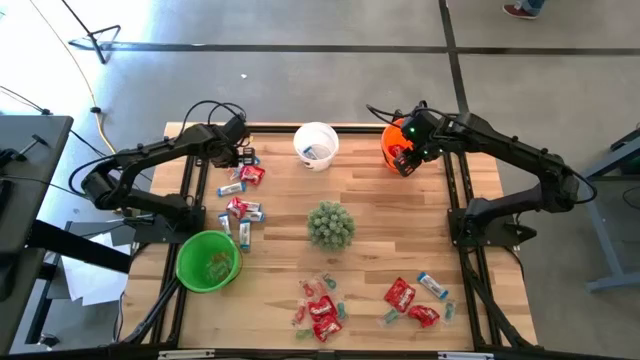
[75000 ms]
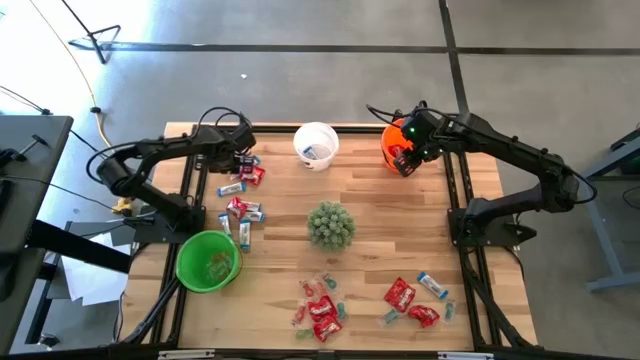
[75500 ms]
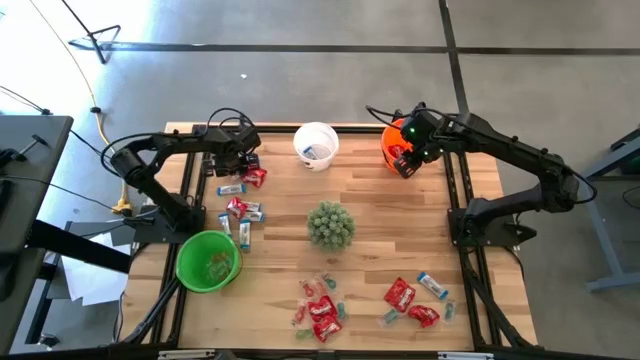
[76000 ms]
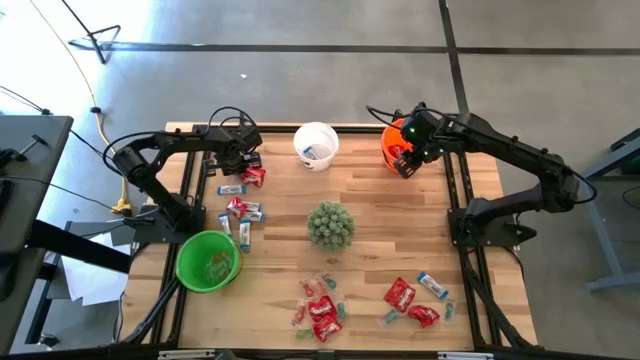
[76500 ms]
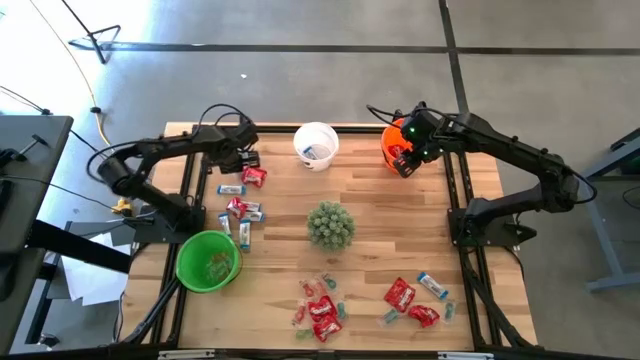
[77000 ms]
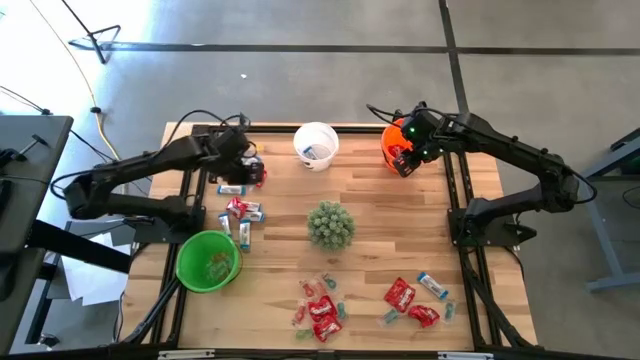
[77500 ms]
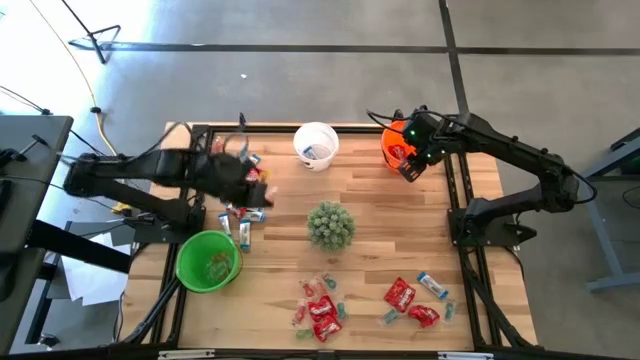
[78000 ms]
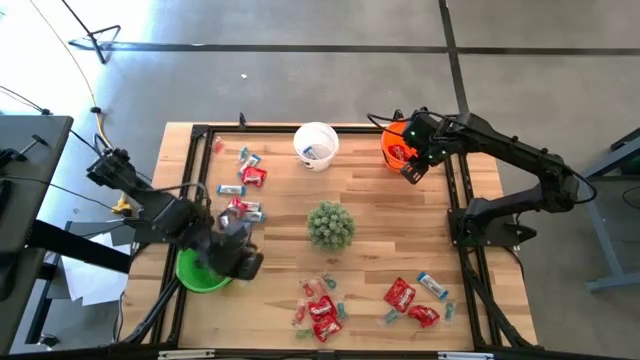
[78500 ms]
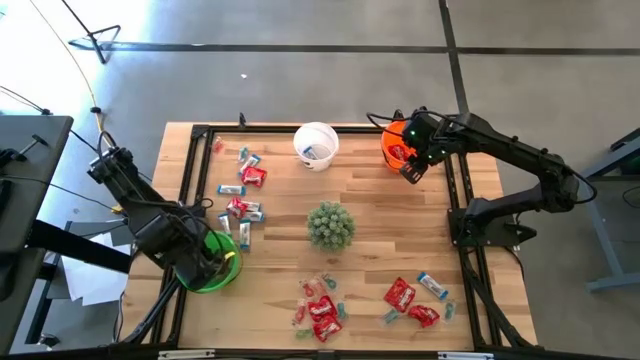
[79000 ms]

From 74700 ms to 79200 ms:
Task: Sort candy
Put the orange gummy into the green bucket

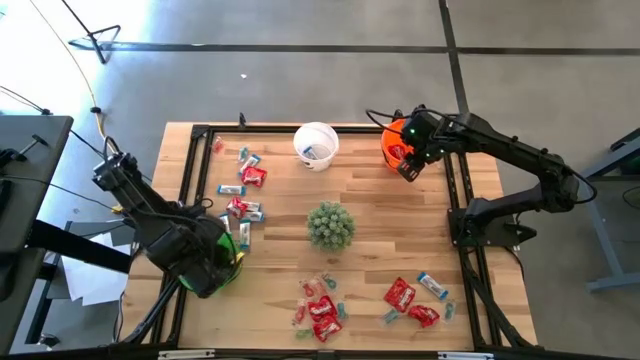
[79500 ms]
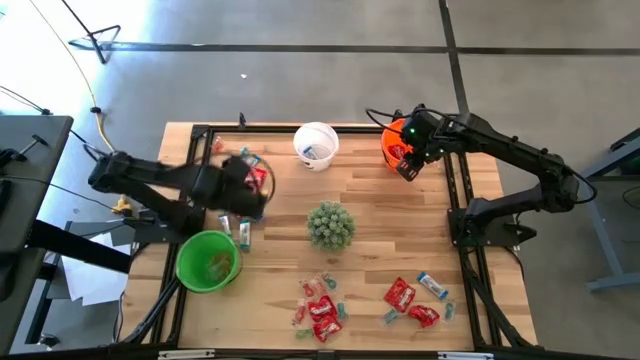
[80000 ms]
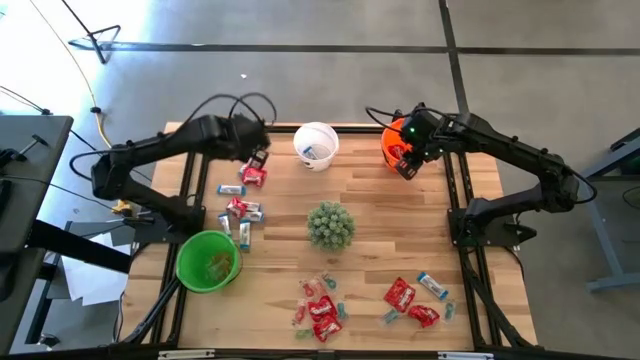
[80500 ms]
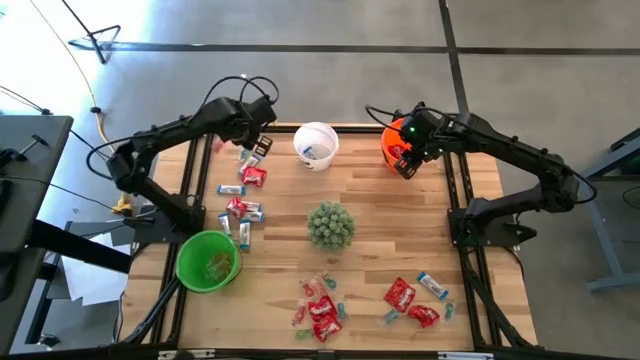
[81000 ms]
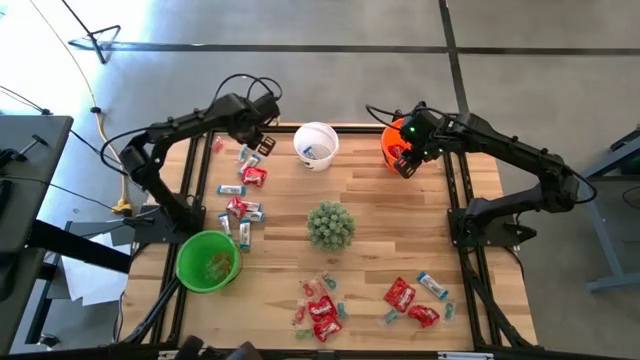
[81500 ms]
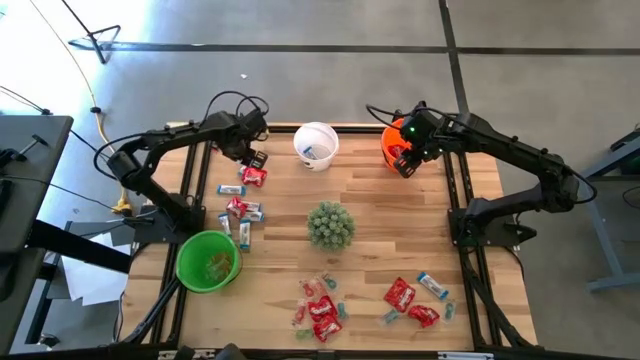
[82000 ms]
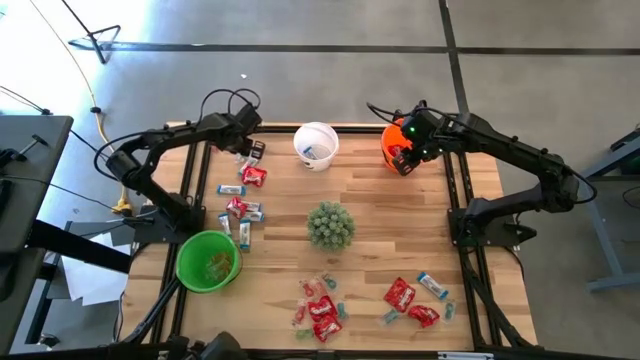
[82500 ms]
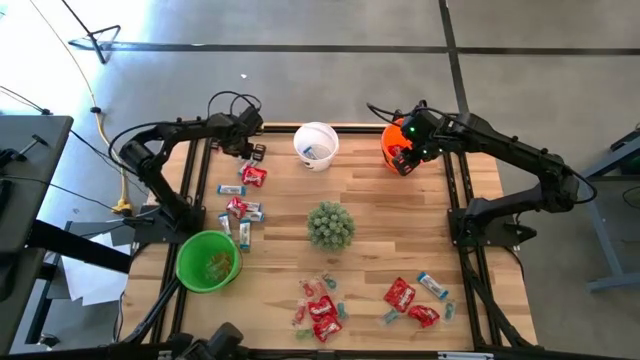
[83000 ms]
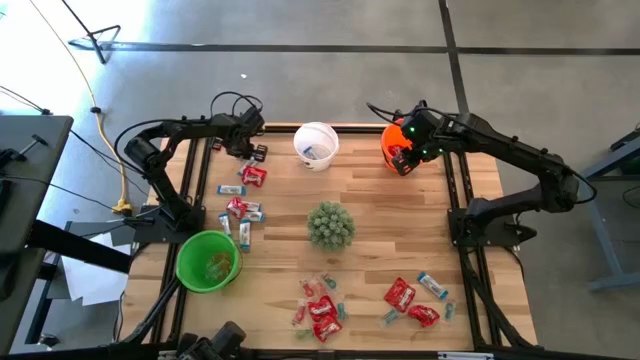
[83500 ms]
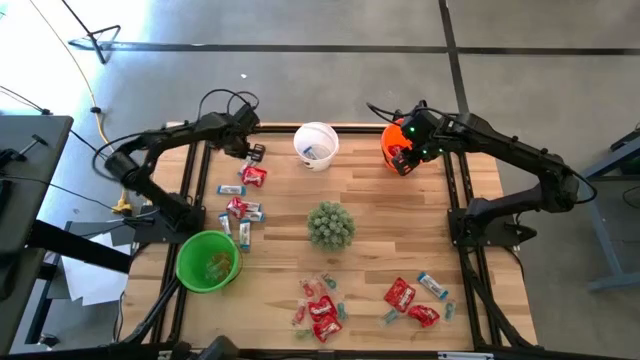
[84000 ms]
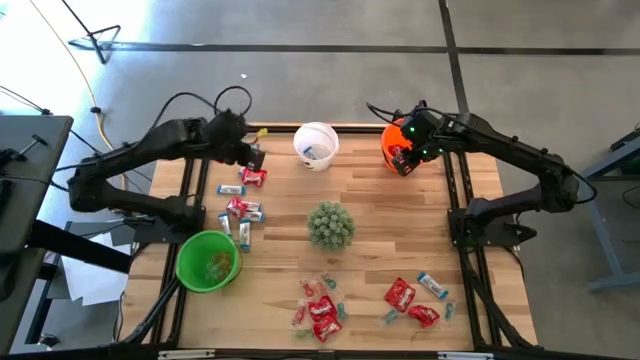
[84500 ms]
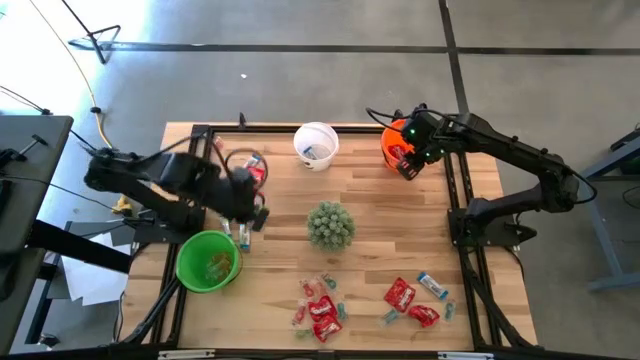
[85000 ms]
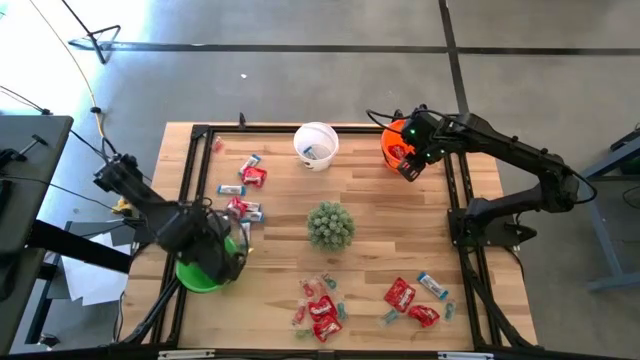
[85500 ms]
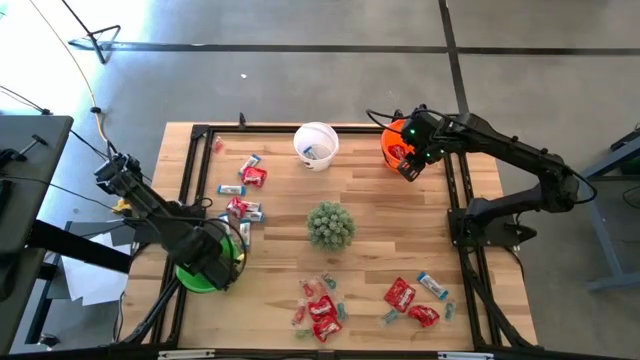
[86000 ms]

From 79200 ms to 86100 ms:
Put the blue gummy into the green bucket

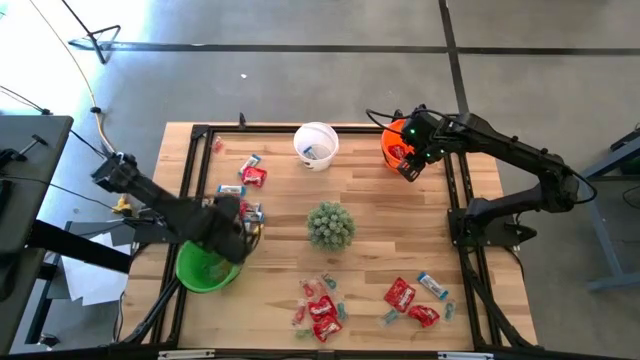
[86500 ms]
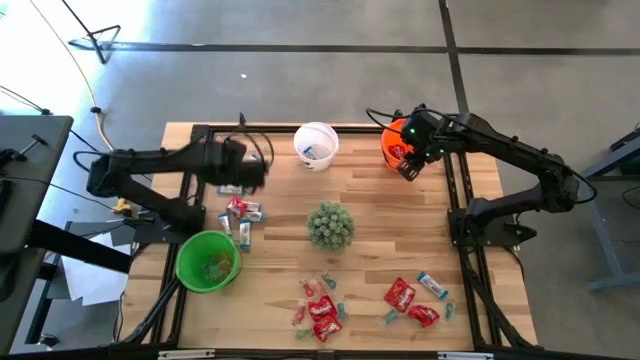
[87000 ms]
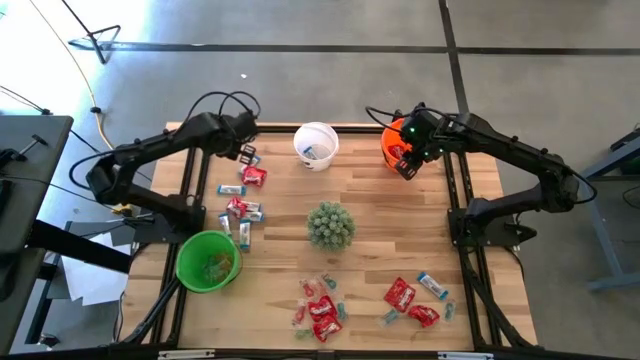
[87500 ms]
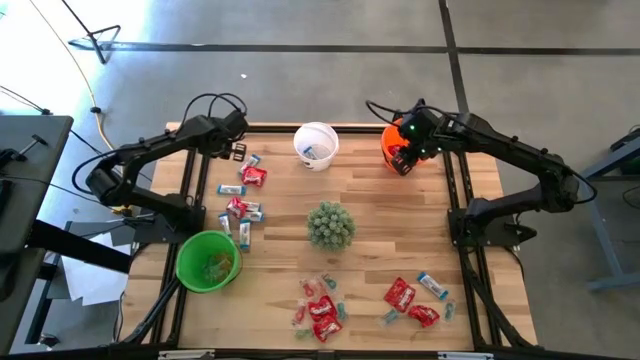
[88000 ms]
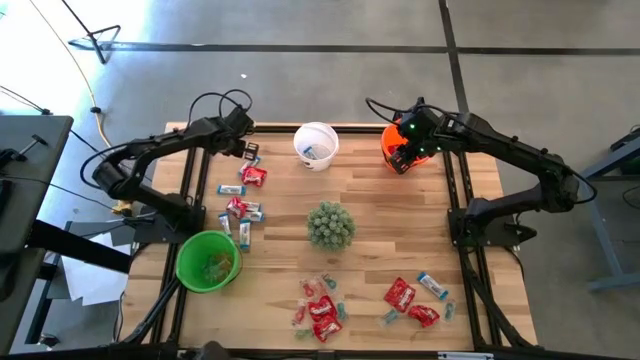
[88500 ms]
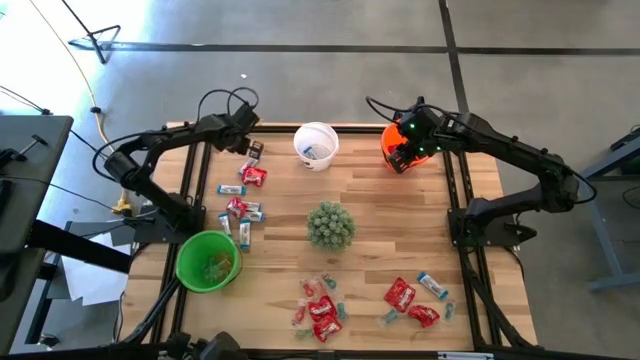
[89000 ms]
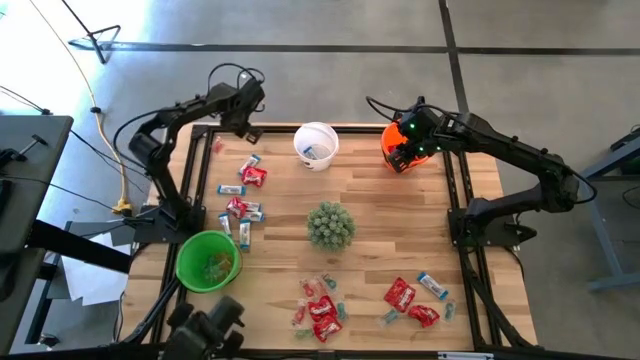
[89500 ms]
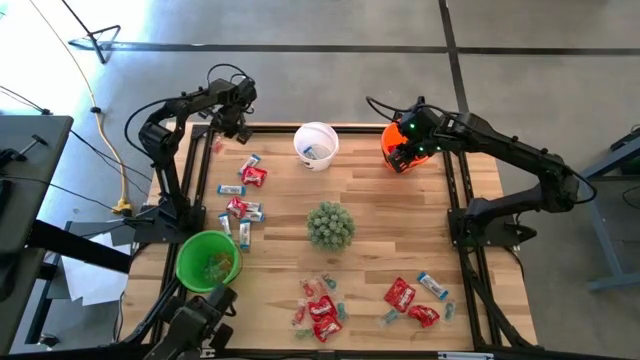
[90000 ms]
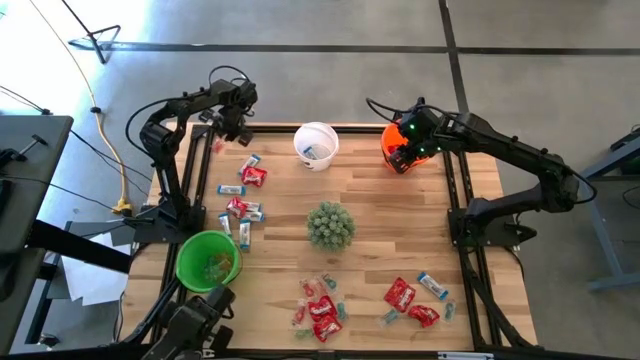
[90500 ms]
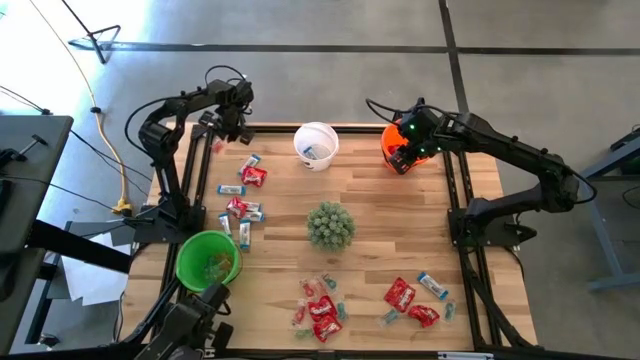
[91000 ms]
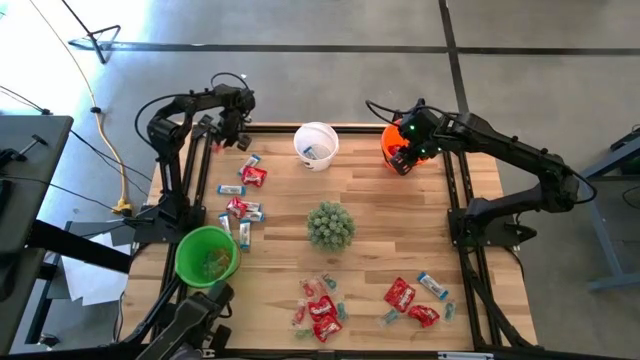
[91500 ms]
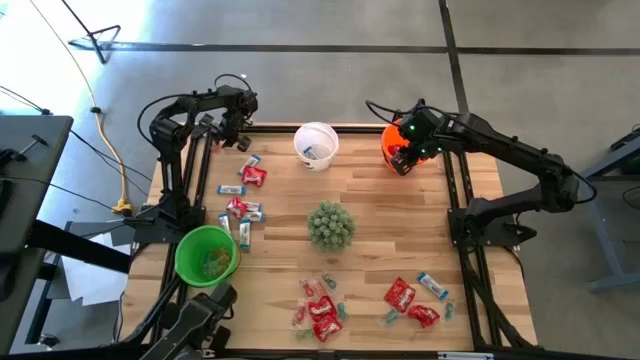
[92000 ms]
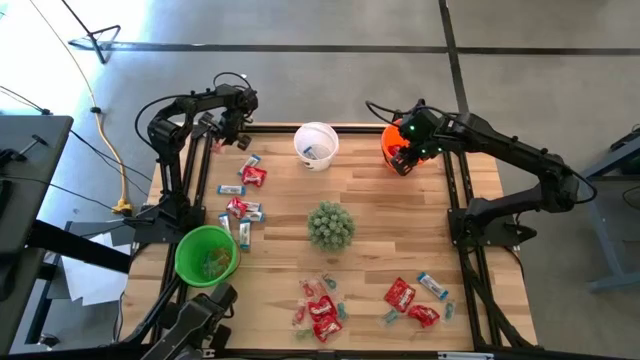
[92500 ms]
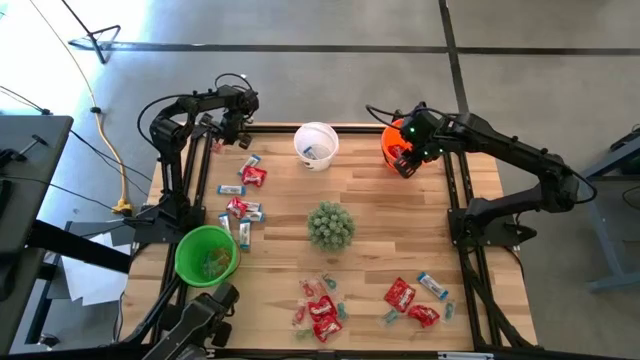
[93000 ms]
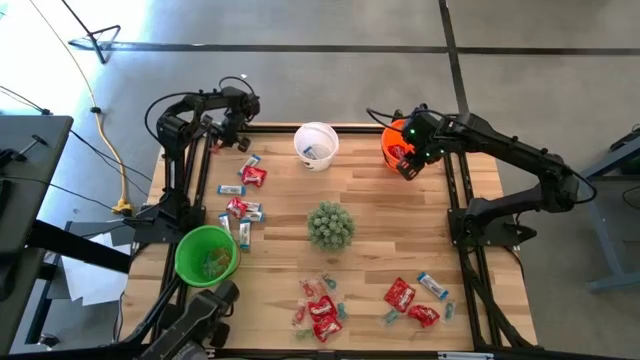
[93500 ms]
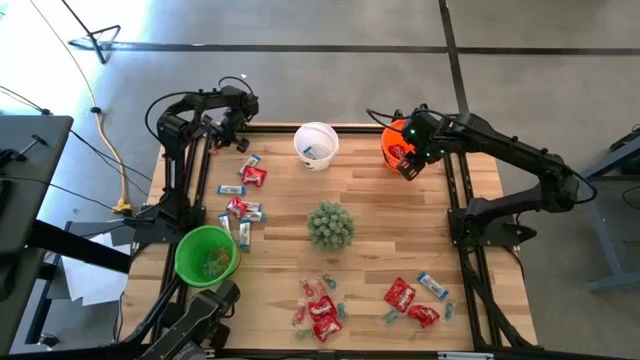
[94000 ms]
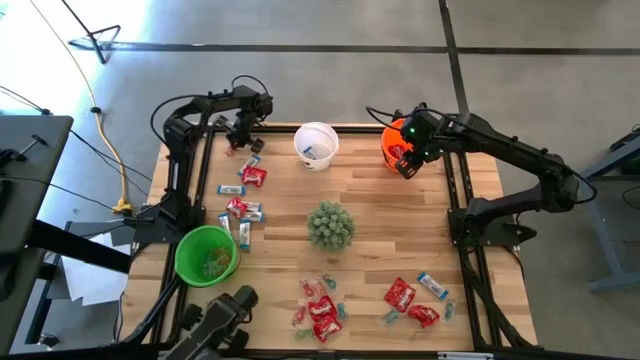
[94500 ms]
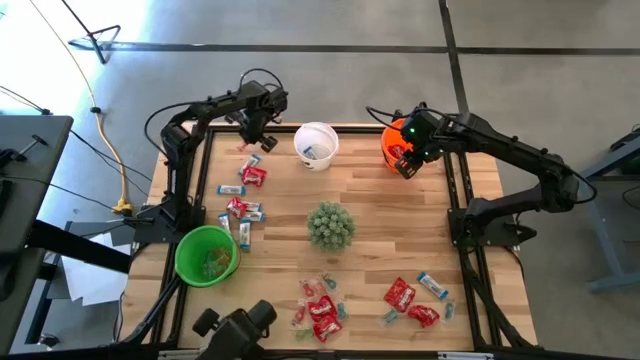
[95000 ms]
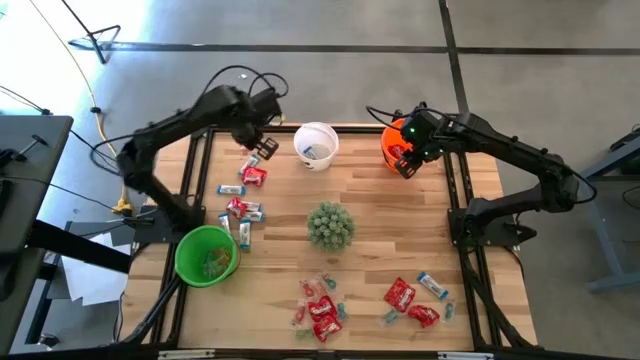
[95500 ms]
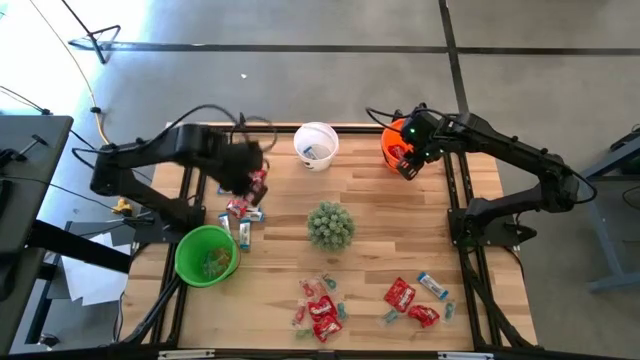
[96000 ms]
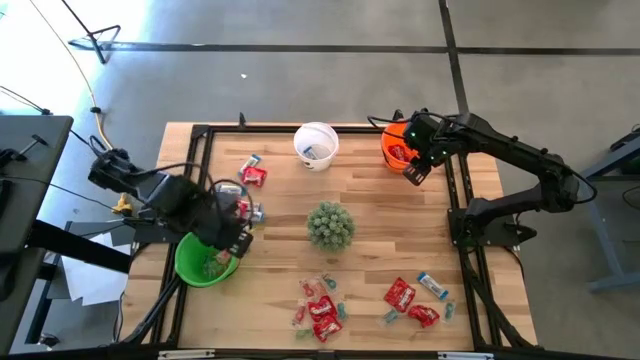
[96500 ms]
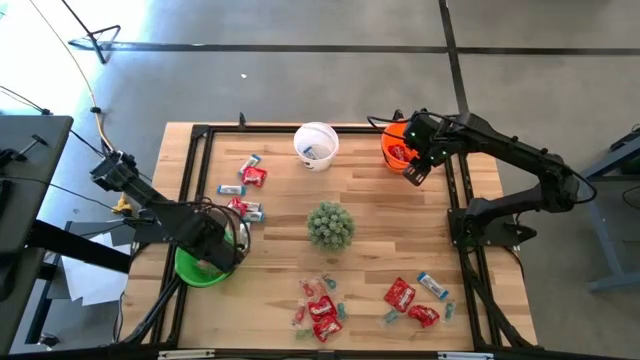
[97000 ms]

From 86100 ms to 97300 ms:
Put the orange gummy into the green bucket
